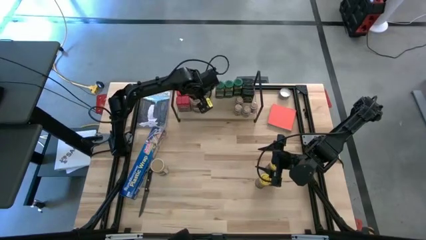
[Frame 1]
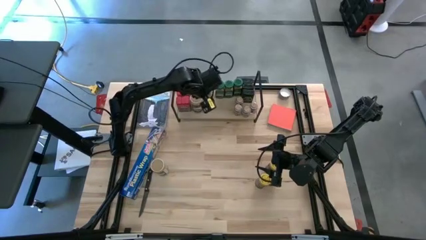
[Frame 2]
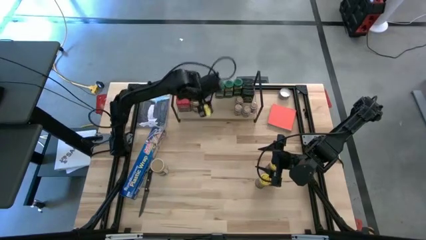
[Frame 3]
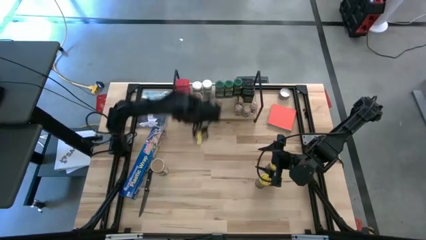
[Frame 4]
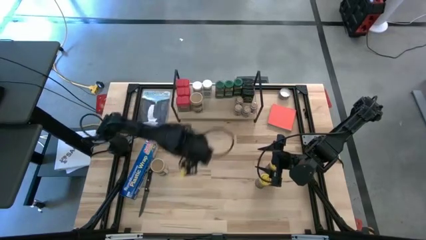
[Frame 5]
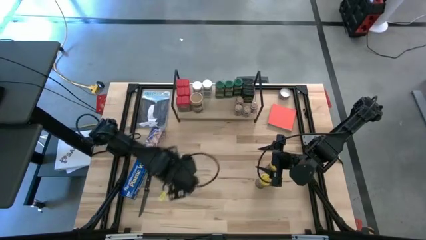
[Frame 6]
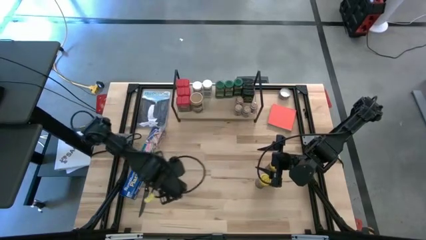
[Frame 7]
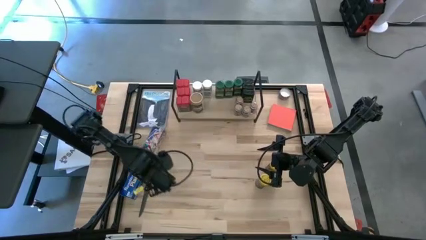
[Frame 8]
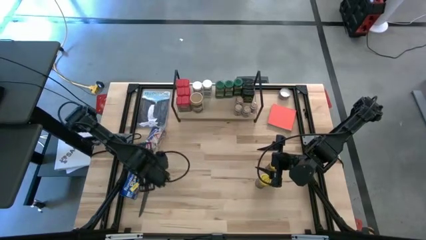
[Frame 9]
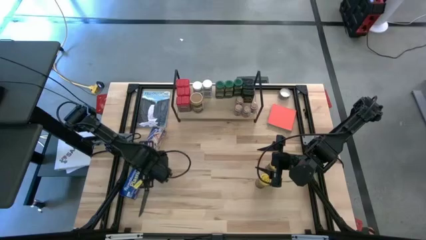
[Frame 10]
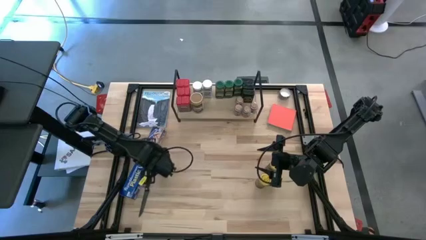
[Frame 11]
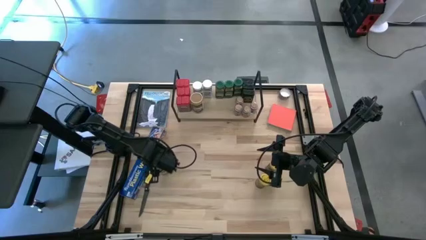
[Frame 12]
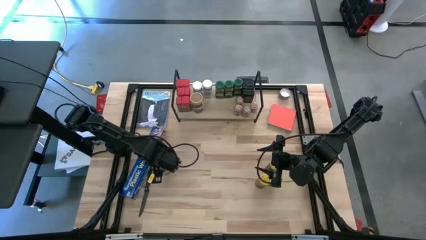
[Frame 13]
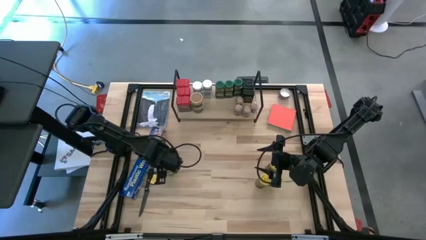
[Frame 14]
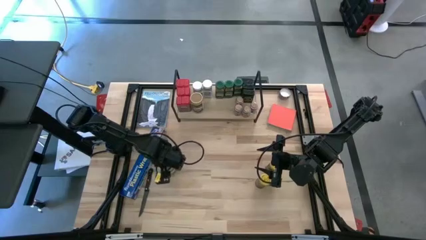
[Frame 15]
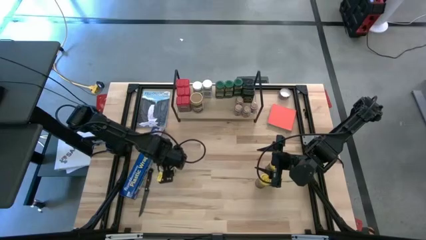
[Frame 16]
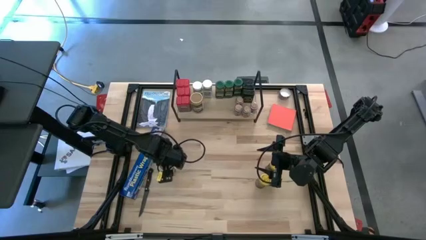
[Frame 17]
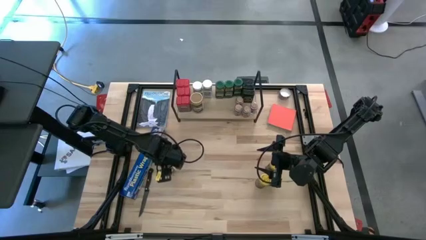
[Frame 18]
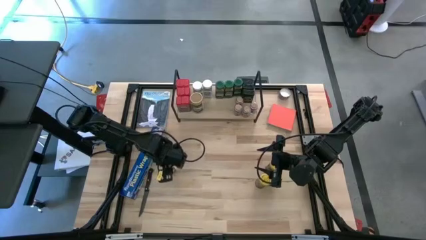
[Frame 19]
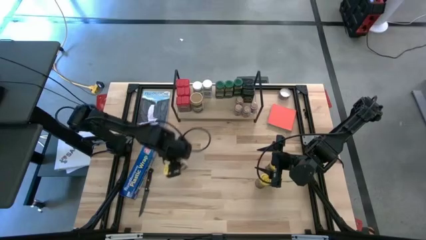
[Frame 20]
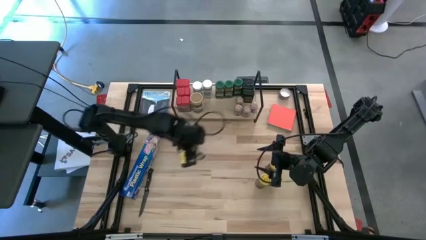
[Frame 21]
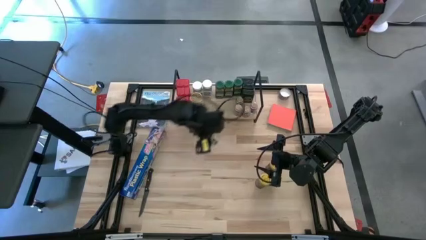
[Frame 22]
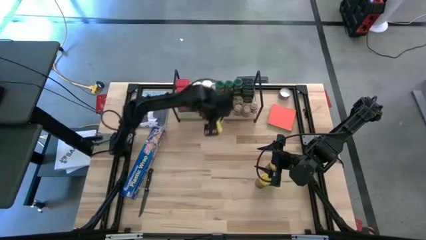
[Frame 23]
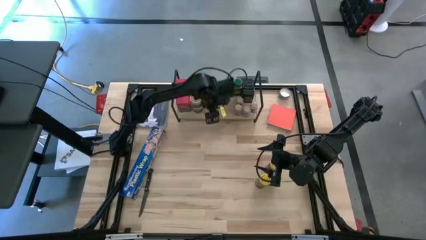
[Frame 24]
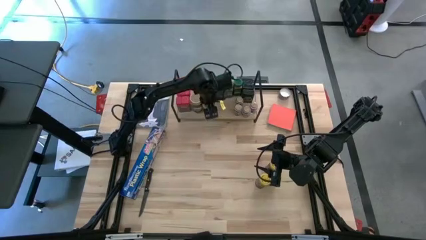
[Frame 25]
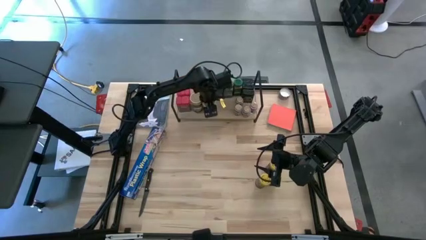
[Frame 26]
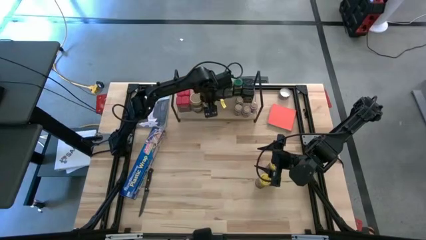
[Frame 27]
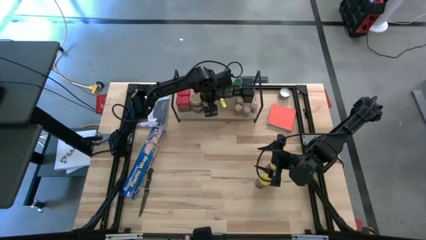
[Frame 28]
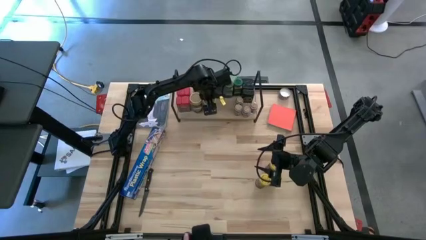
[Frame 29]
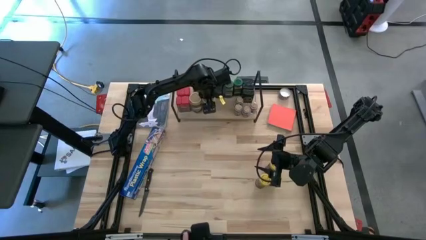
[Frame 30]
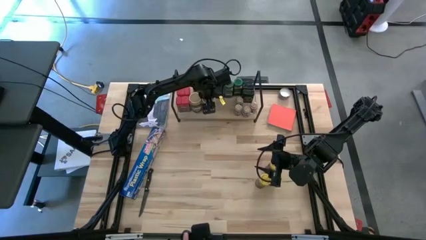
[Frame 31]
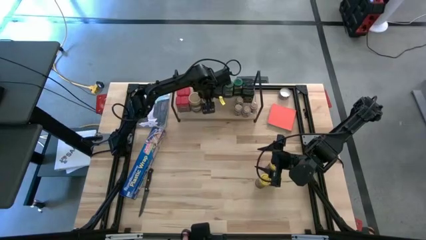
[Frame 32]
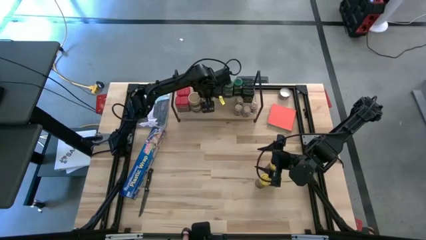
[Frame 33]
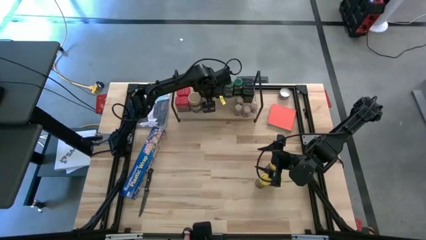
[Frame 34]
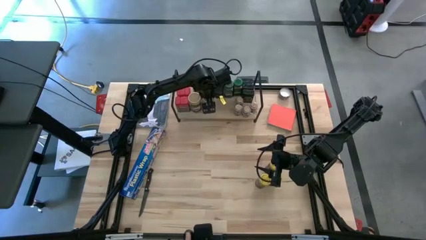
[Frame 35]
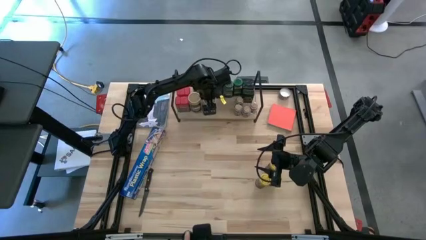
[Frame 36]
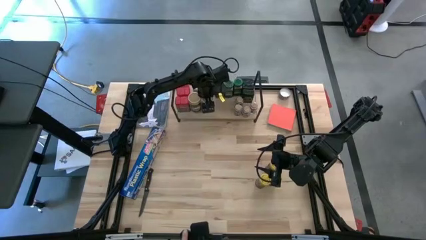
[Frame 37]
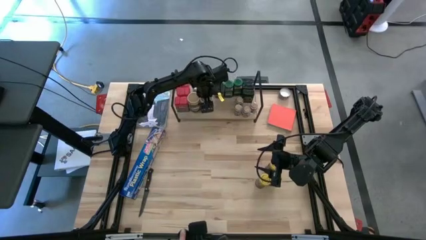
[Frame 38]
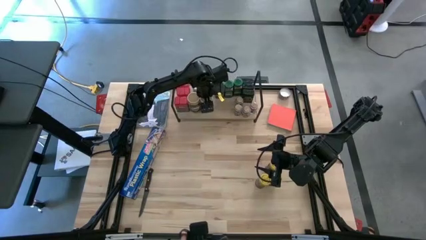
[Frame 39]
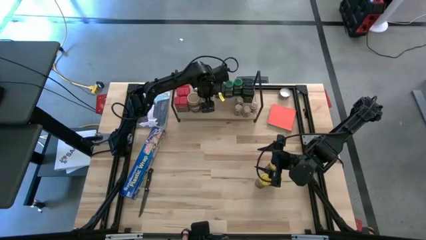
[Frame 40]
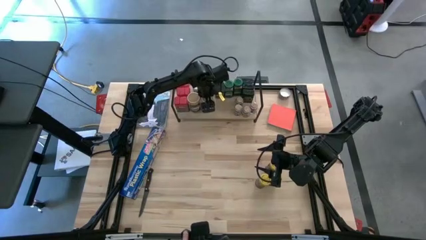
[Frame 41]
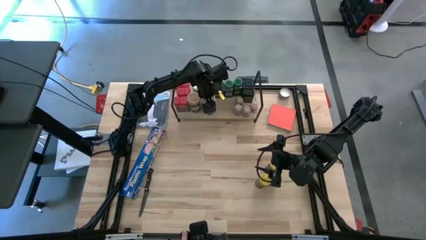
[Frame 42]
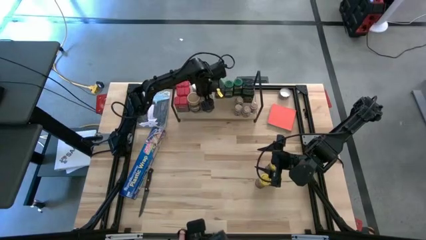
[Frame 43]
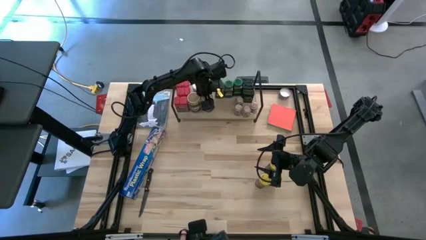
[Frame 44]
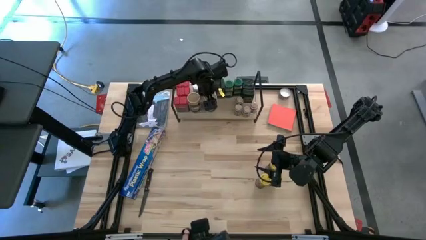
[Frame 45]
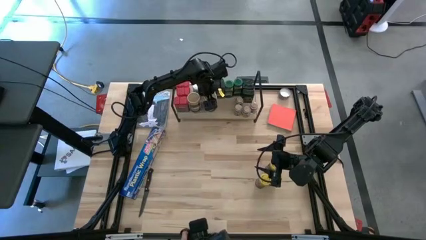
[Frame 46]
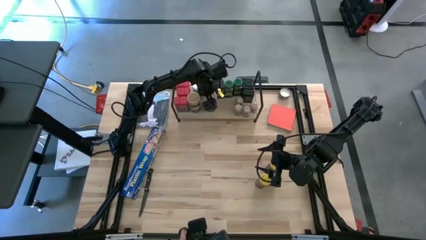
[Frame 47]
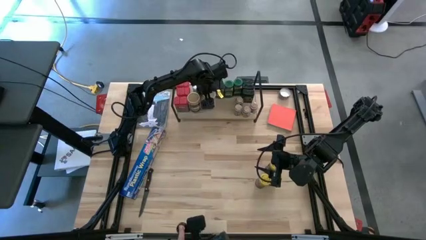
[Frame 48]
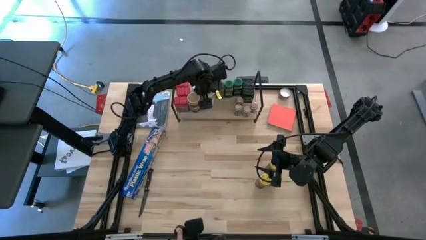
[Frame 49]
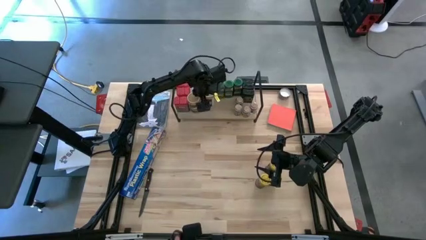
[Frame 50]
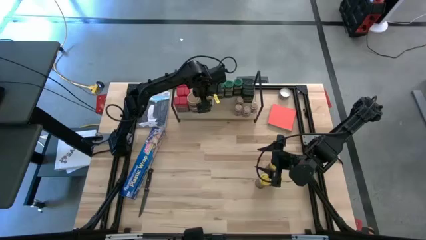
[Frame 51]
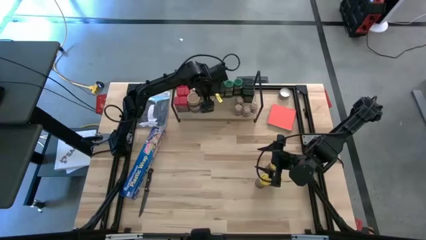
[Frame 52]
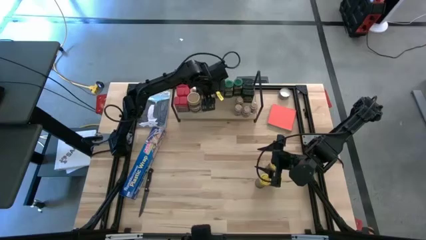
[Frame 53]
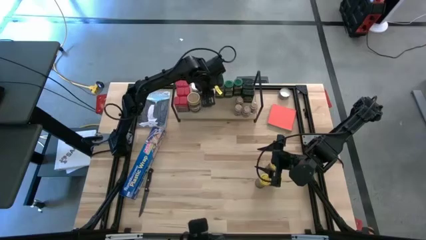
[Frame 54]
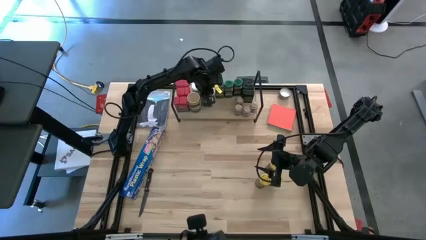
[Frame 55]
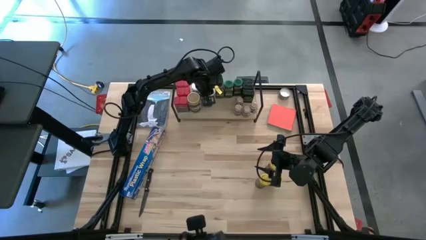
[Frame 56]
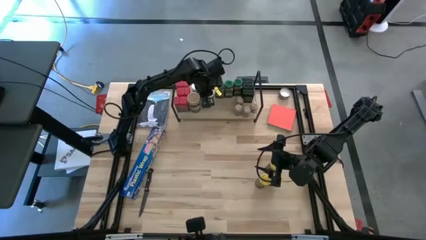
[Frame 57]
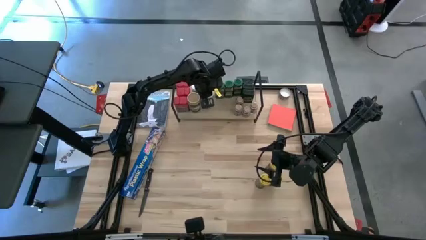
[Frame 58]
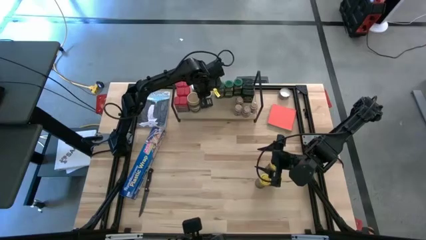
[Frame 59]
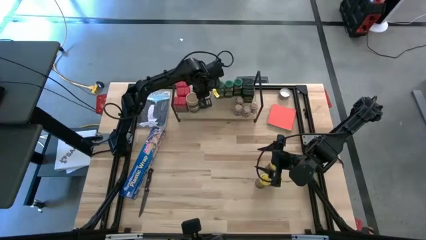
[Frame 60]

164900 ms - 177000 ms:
Task: Shelf spices
Put the brown seasoning bottle on the shelf aligned with the white seasoning bottle

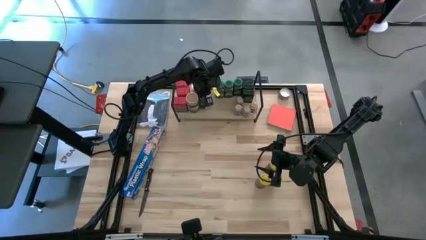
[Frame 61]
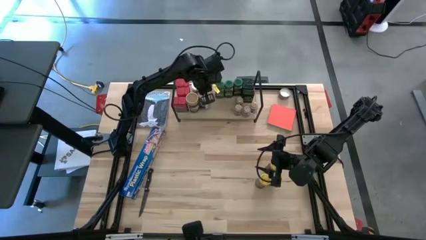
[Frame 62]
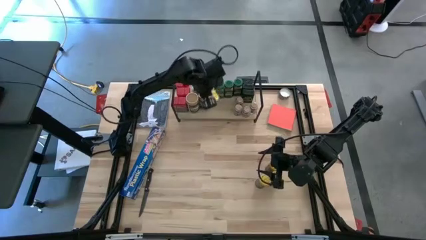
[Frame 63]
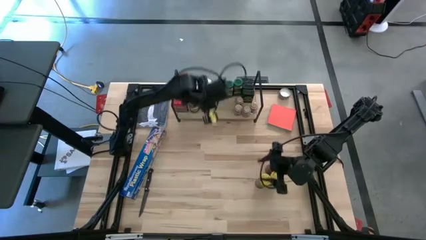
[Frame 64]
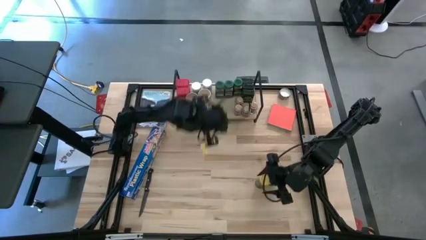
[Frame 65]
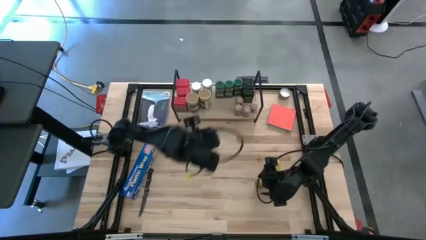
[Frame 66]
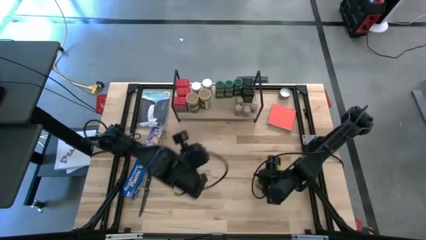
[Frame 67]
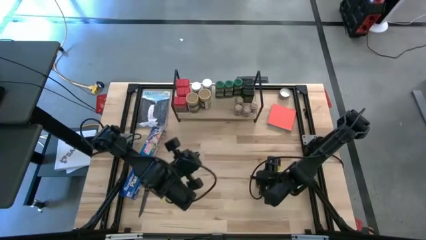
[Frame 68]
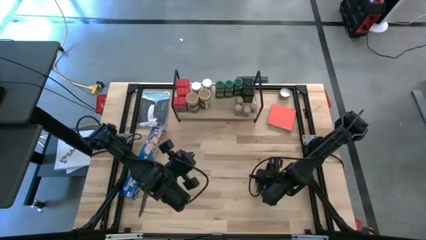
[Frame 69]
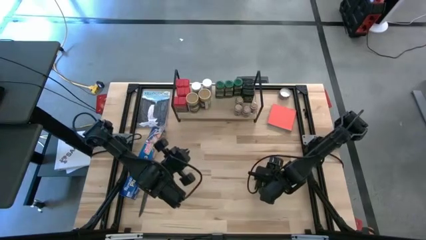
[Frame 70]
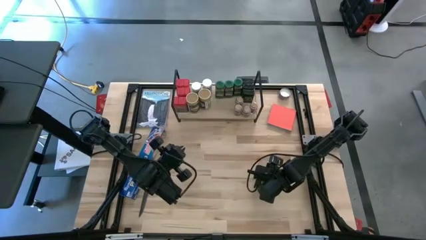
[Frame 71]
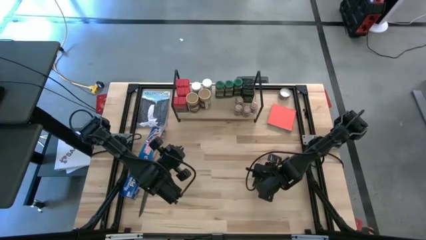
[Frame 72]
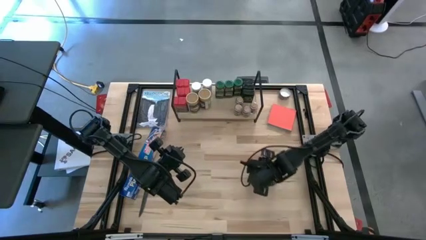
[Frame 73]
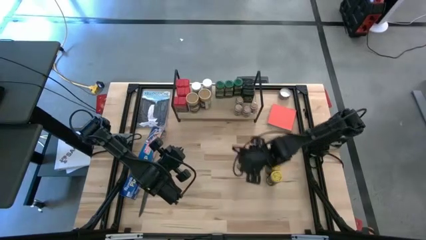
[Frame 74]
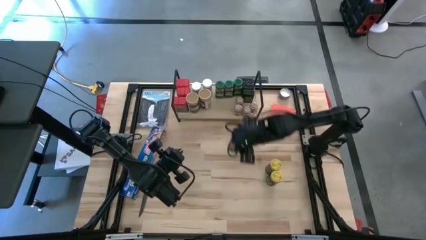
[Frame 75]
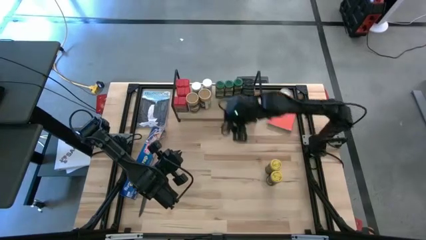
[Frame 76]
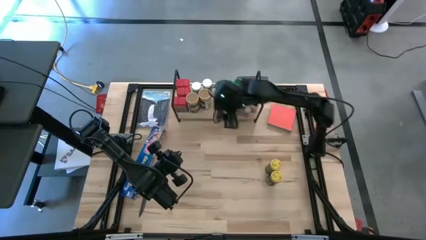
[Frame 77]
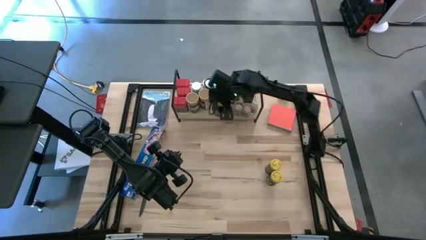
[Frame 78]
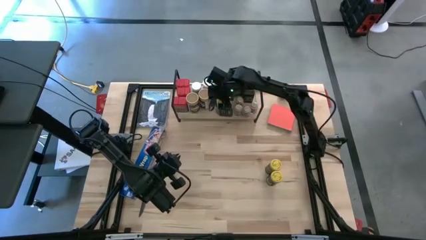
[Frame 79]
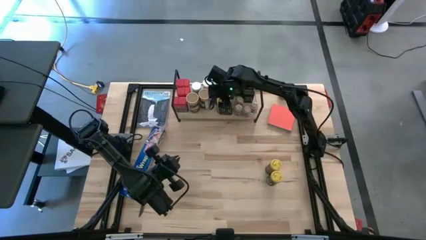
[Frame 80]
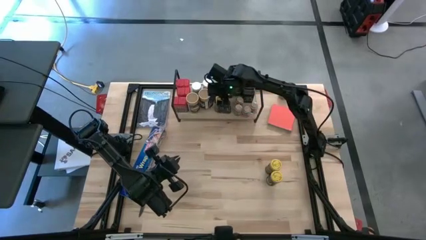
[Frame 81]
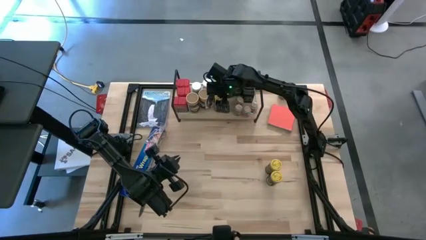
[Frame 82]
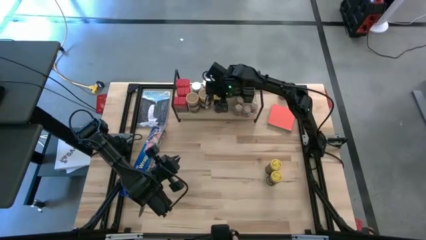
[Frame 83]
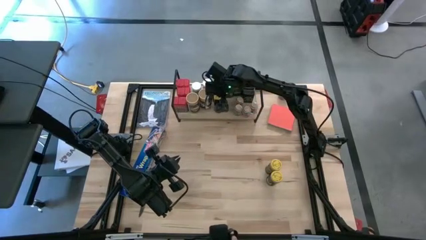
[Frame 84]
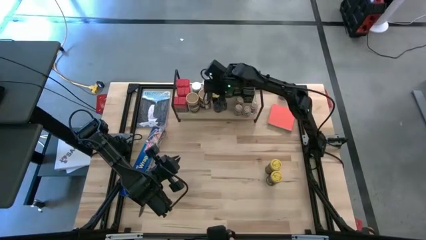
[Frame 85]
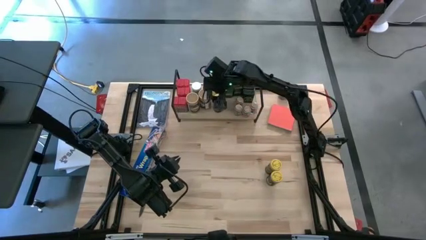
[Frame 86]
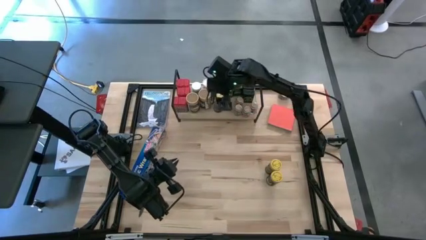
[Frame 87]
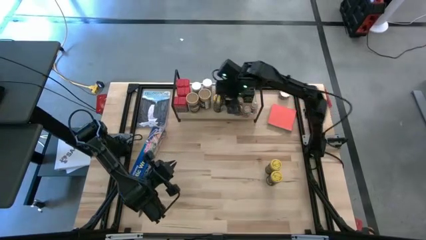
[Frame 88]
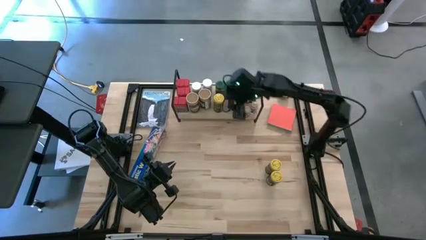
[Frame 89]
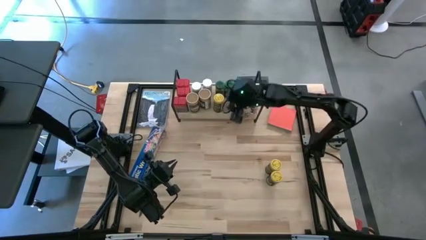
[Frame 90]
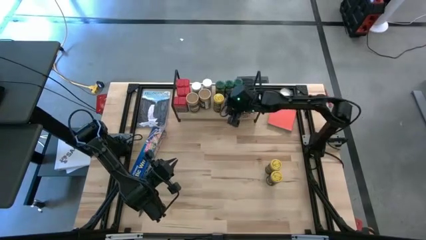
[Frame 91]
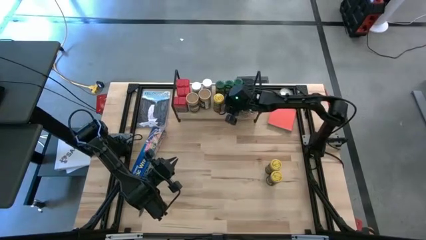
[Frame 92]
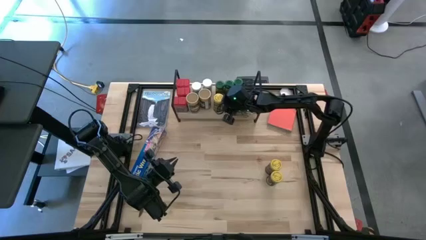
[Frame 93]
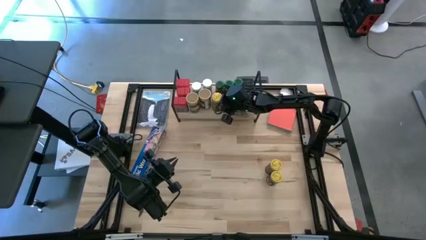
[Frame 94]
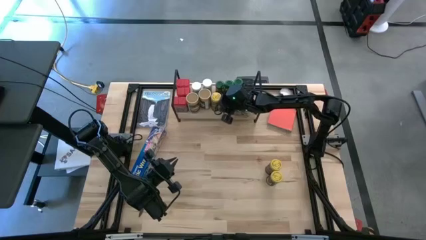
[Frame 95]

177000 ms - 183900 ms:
Put the yellow seasoning can on the shelf aligned with the green seasoning bottle
